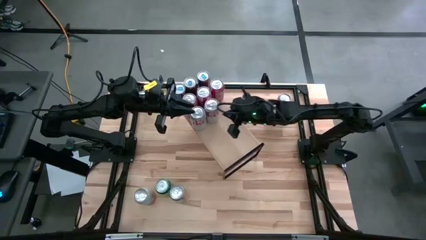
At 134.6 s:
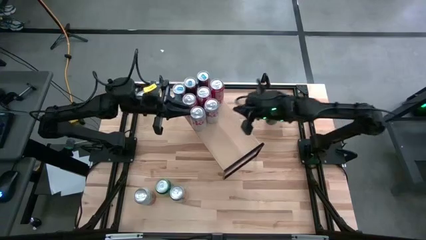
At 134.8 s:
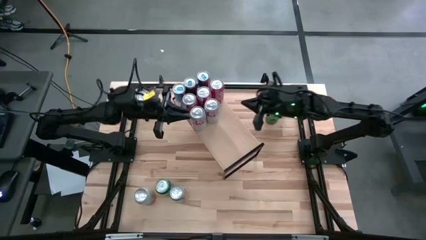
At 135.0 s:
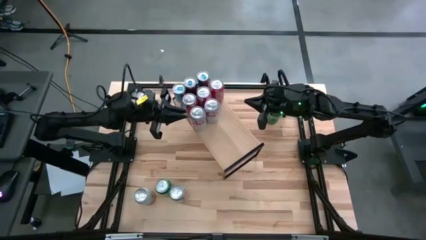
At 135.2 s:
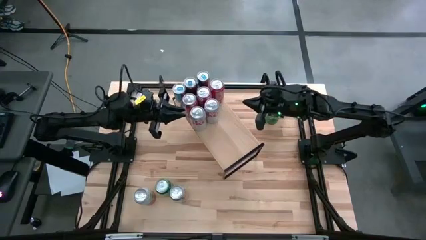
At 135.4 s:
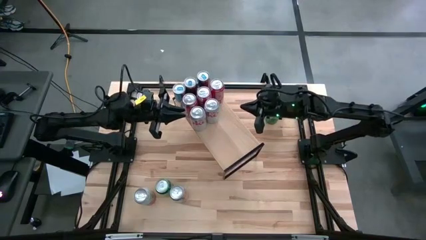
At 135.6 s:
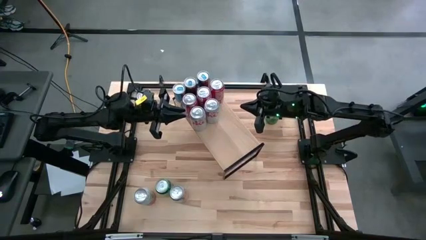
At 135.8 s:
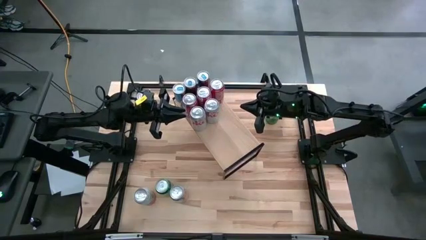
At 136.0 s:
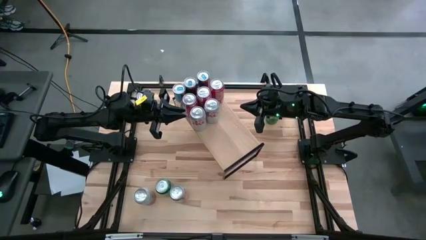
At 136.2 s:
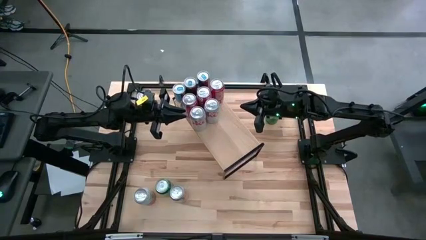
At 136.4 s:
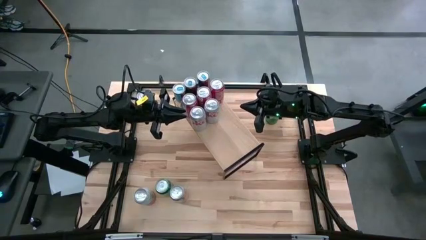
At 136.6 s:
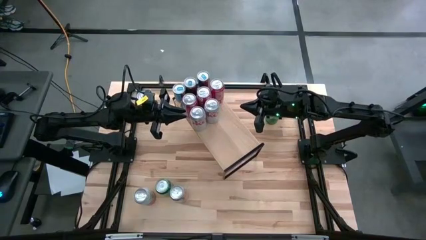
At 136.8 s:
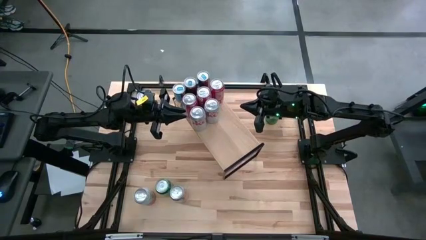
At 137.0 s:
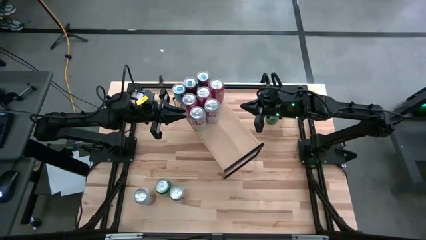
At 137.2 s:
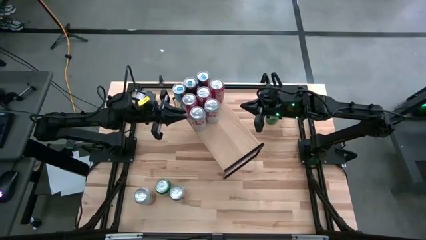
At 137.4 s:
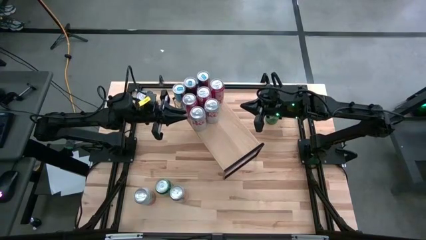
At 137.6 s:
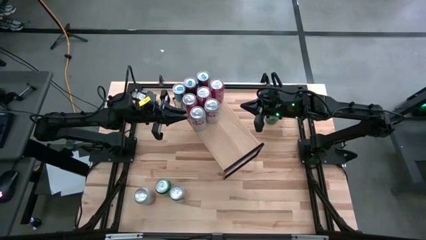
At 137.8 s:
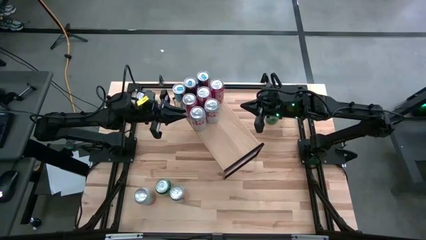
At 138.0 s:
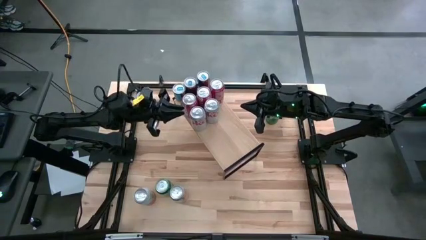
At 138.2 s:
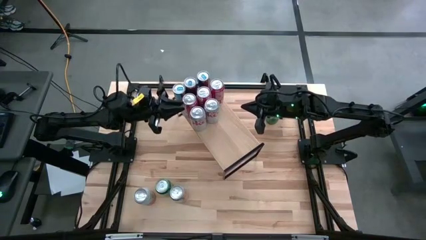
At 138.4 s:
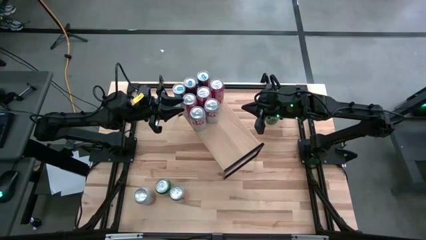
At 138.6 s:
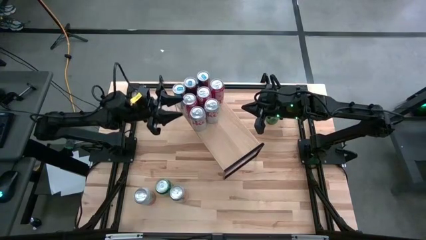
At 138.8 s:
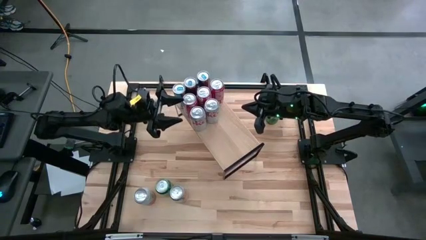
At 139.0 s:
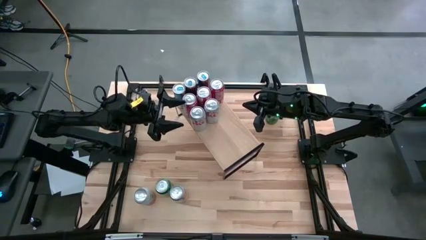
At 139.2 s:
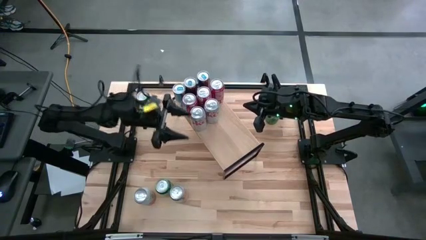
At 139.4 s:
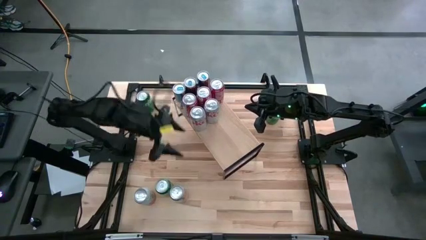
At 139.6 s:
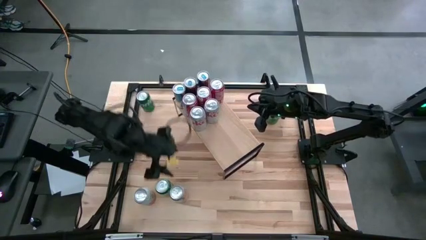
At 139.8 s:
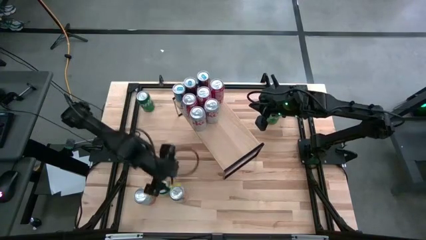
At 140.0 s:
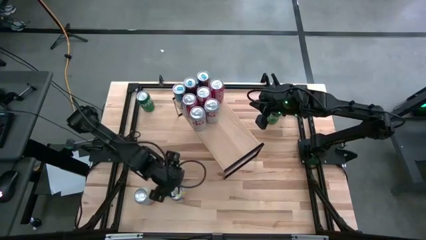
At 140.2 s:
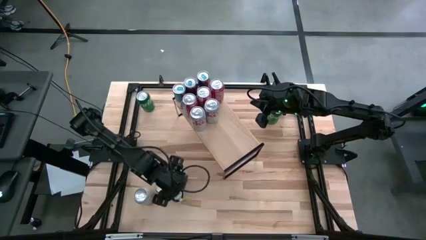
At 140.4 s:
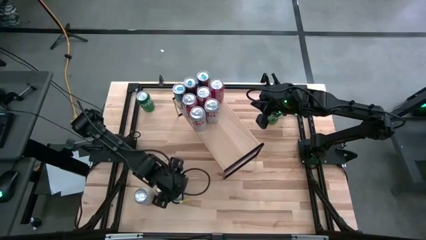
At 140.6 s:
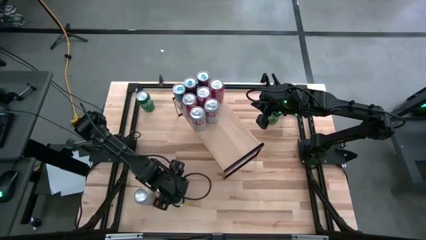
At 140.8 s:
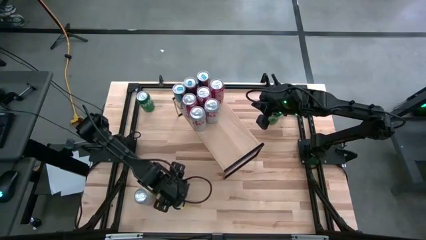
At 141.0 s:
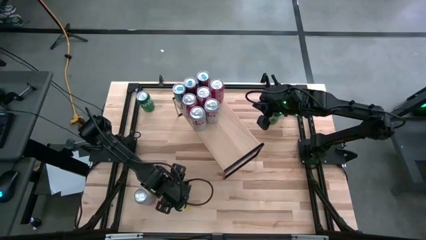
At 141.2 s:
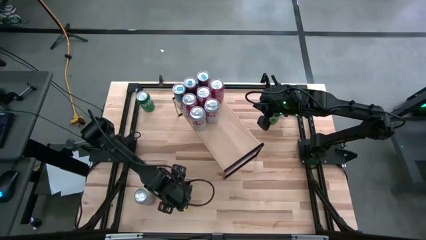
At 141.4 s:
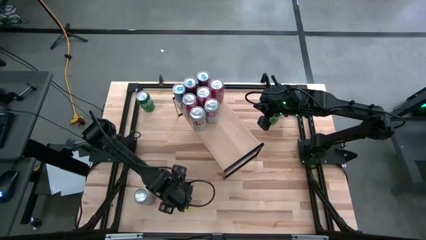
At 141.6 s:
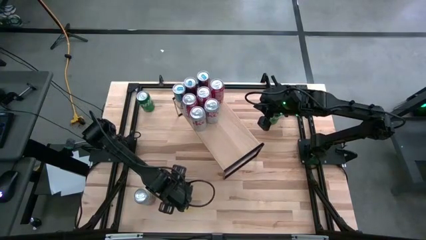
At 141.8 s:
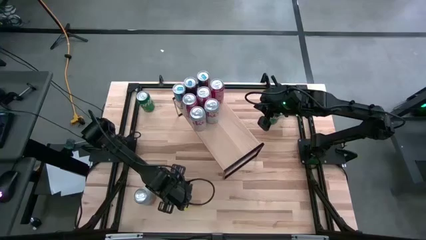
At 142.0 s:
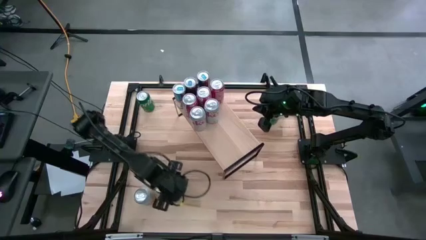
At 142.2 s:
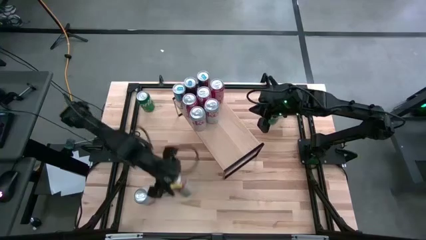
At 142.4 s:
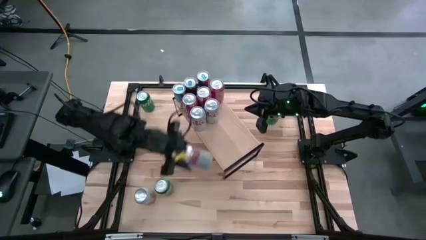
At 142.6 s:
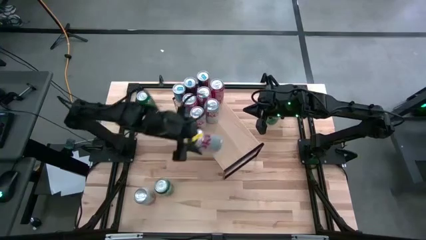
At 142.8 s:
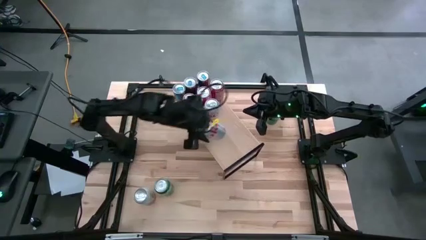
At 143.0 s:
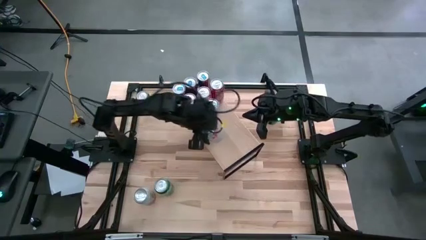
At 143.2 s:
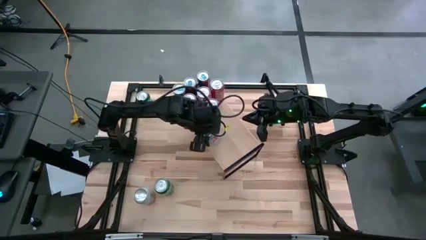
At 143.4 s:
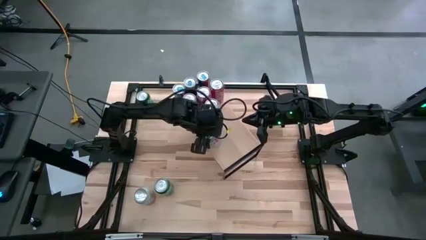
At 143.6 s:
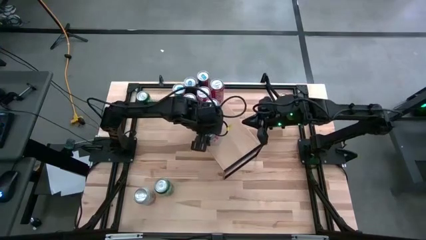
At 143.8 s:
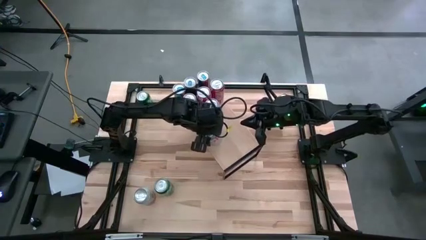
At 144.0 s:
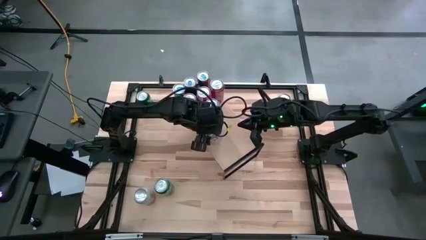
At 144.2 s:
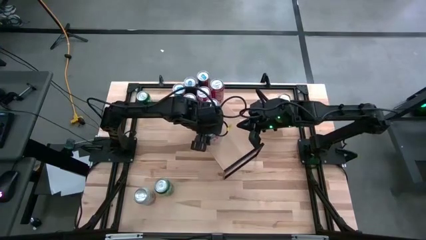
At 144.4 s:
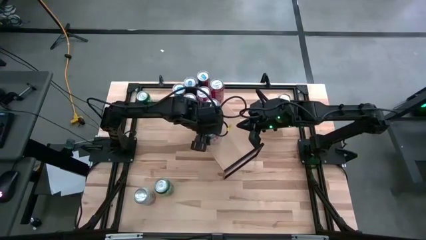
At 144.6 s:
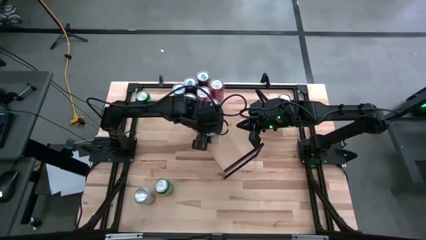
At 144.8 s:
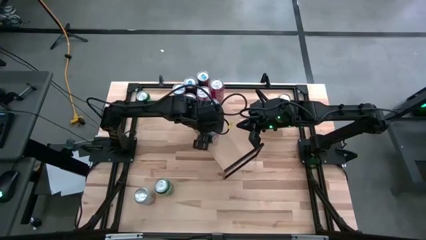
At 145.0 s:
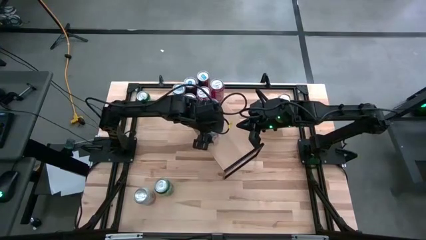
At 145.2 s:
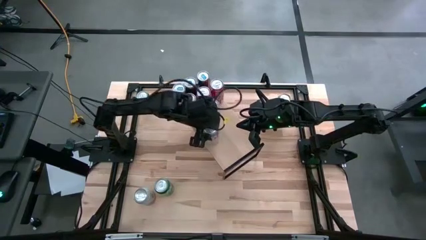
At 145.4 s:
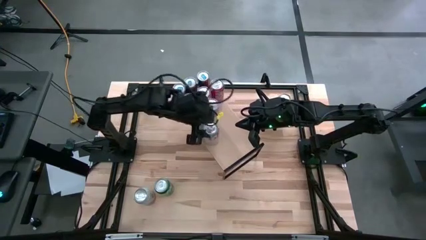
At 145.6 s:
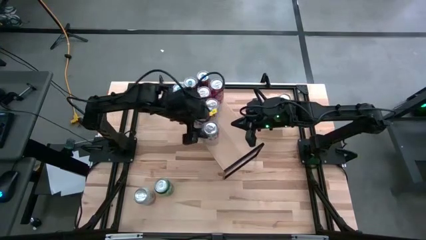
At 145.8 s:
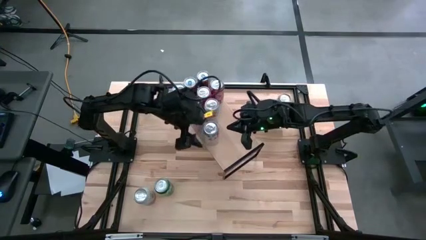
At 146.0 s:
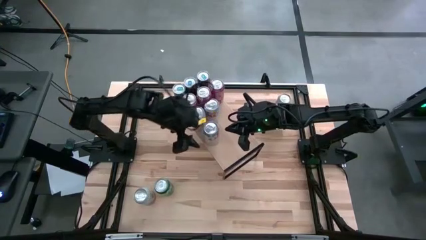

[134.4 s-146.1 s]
Task: Place canned beverage on shelf
Put the silver soda can on the shelf aligned with the other silver soda cans
